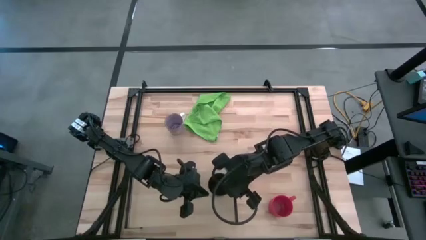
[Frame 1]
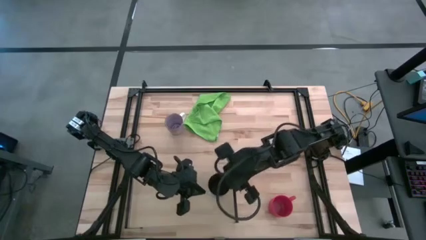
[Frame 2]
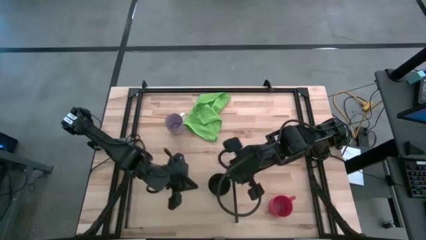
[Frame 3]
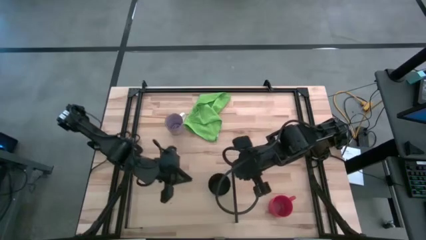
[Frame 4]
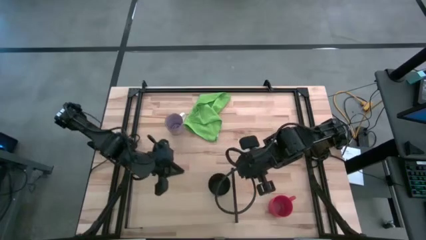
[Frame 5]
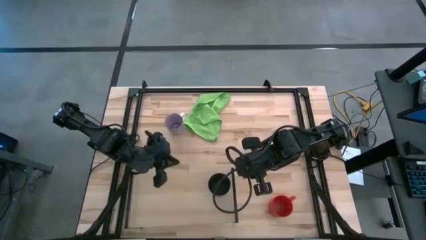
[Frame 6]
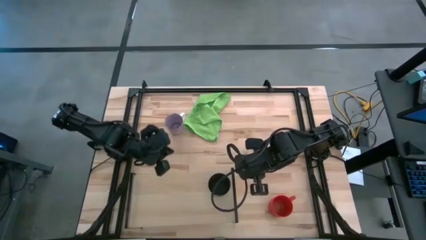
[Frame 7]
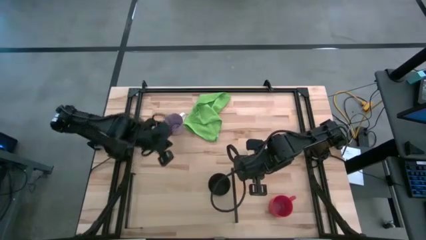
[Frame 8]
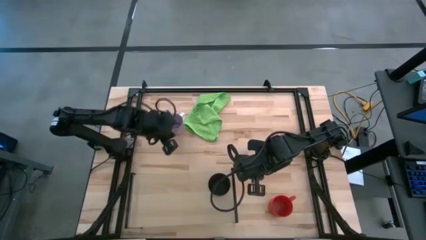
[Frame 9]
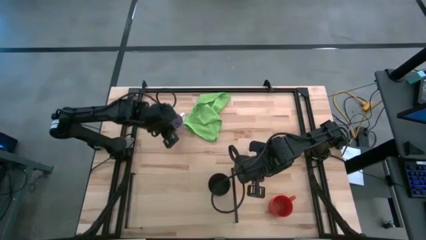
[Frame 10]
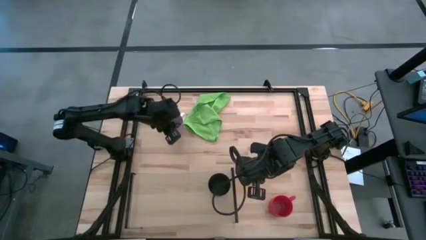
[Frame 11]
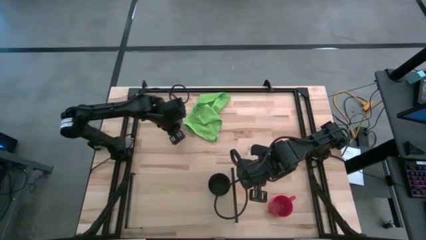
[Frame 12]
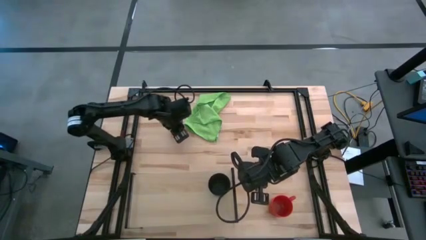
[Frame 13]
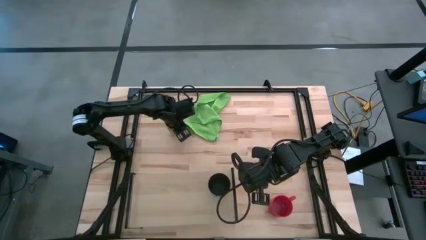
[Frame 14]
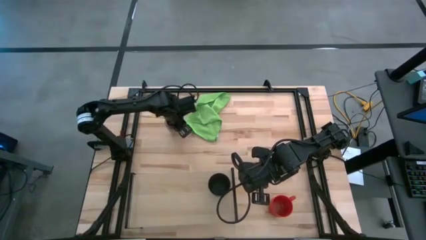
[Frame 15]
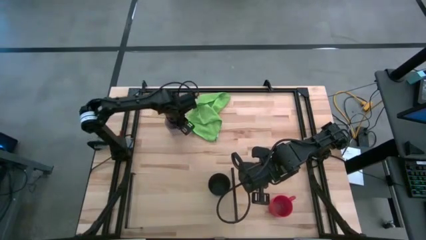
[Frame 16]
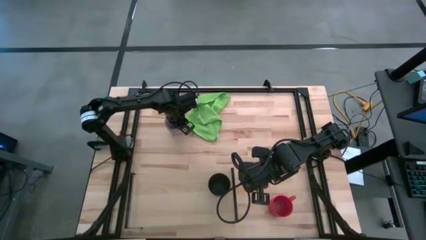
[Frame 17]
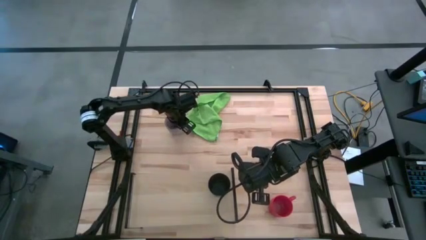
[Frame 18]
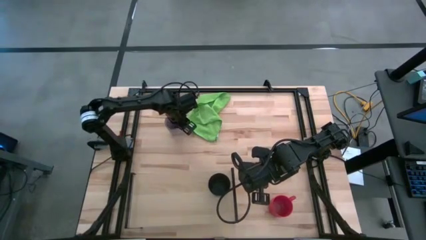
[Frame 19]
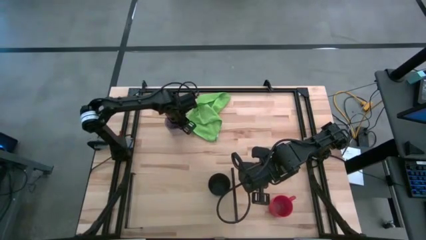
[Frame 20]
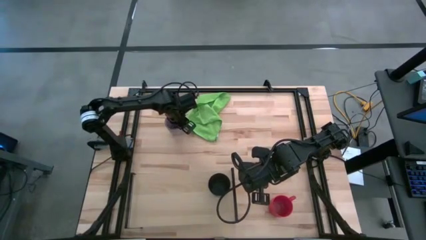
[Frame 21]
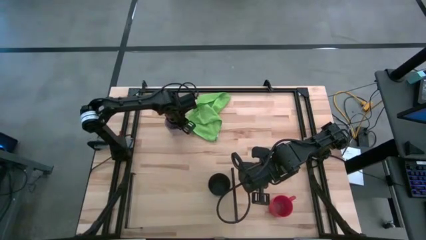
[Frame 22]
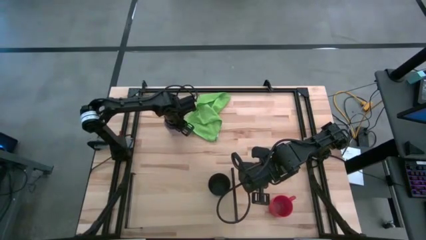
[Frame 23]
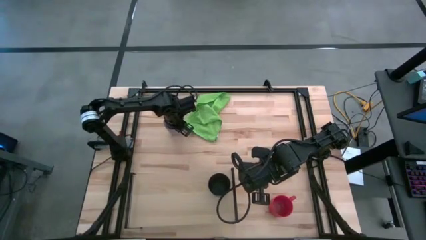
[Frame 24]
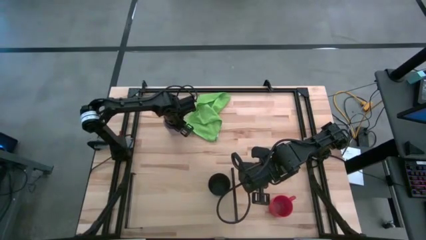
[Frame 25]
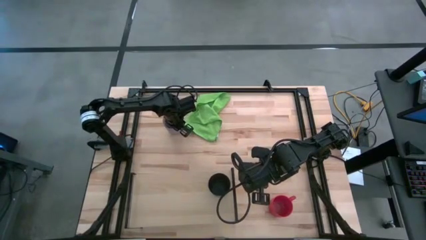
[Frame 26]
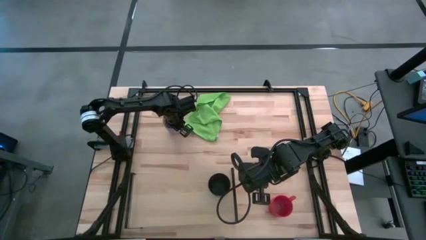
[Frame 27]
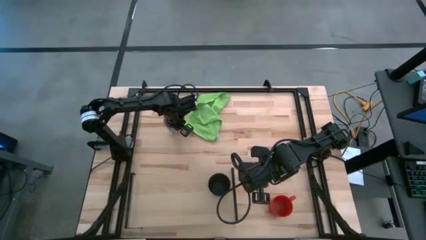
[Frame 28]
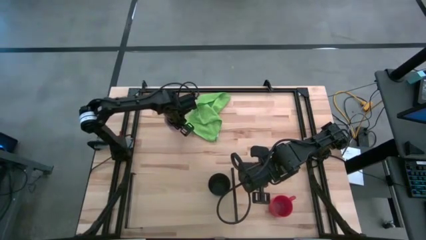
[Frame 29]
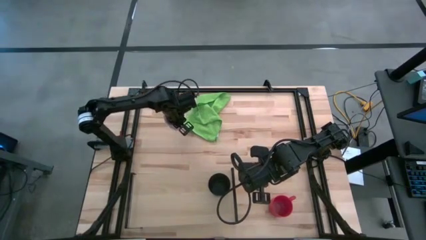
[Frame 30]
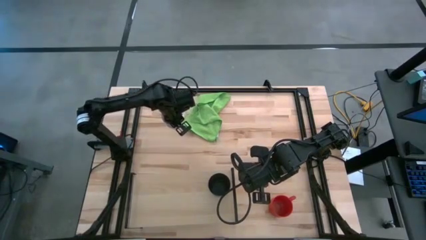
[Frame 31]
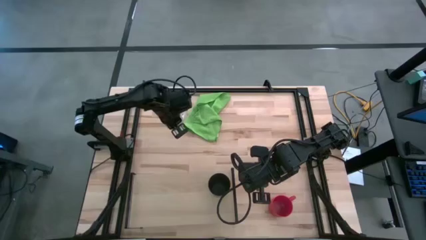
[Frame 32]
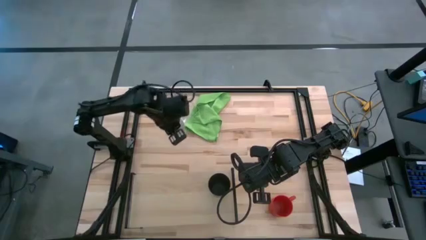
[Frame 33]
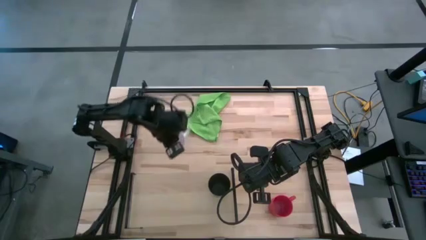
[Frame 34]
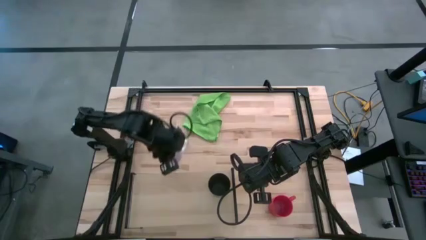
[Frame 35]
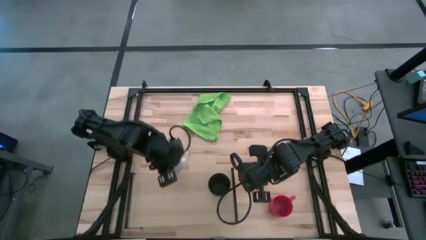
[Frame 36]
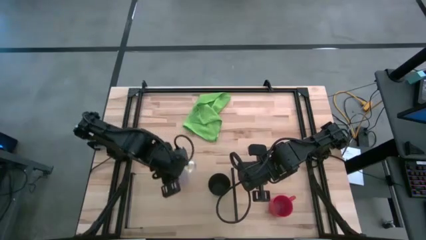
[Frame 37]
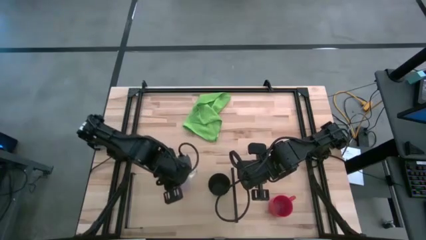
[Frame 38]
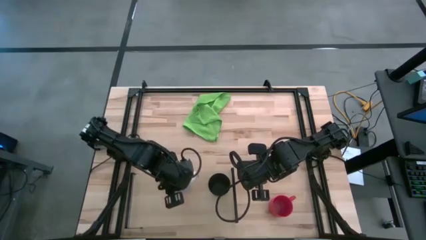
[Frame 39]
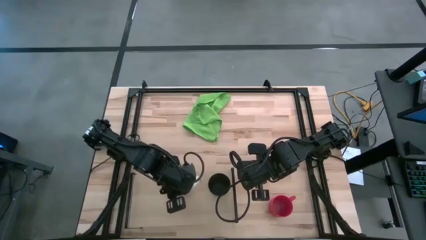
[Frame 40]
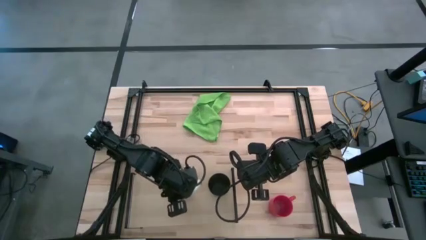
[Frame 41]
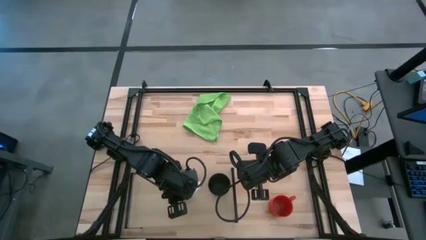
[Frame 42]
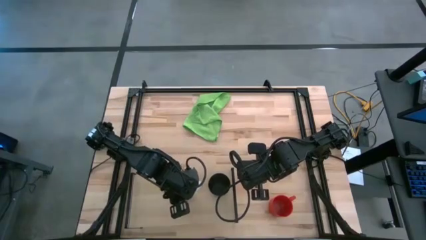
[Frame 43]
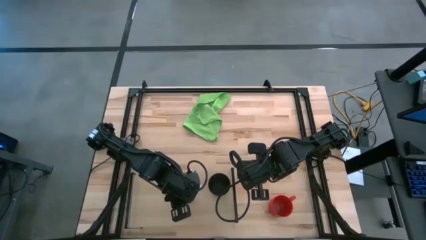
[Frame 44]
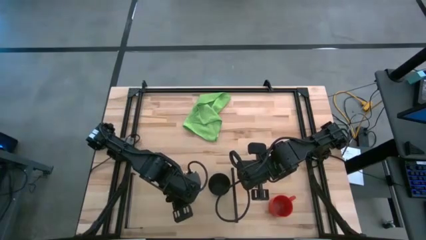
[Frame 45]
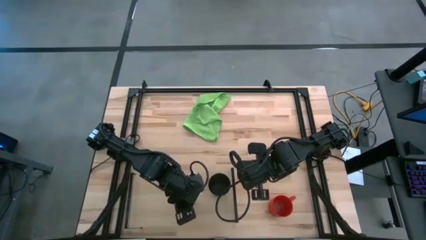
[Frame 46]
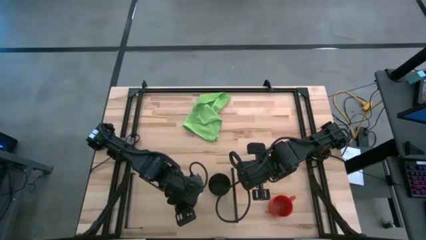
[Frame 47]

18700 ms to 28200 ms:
Task: Stack small to large cups/mugs on shelf
Put the purple mug on the shelf

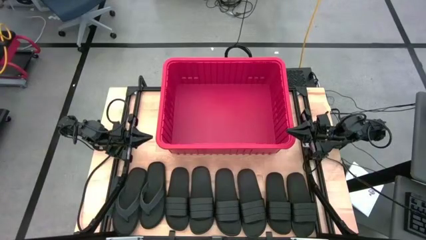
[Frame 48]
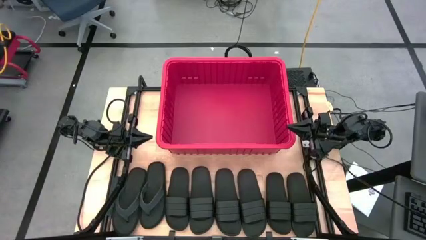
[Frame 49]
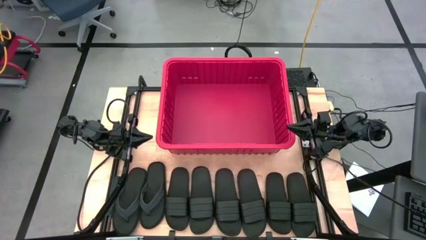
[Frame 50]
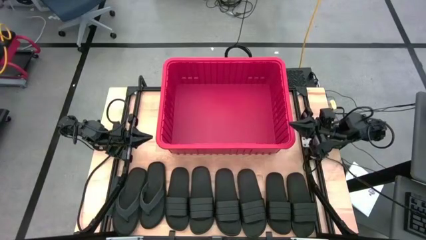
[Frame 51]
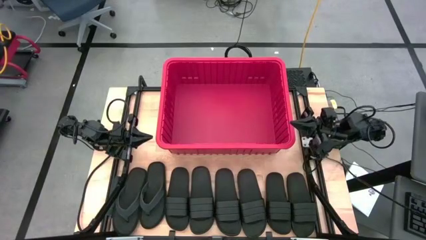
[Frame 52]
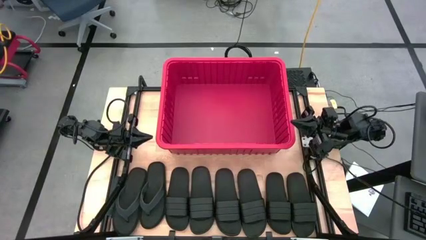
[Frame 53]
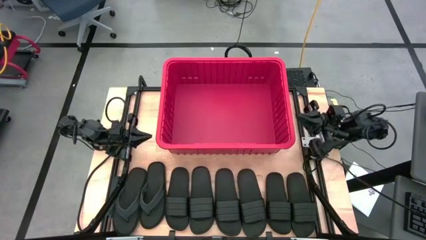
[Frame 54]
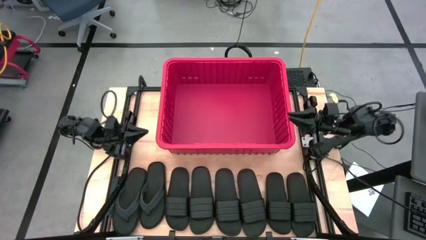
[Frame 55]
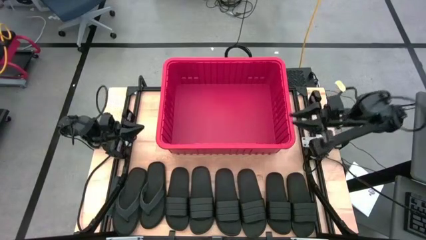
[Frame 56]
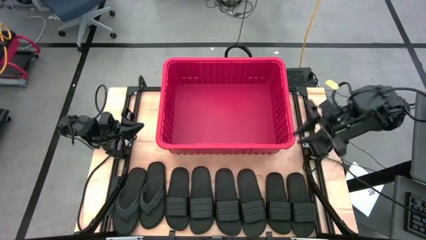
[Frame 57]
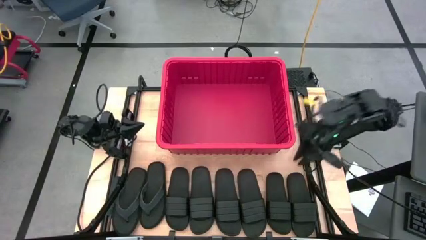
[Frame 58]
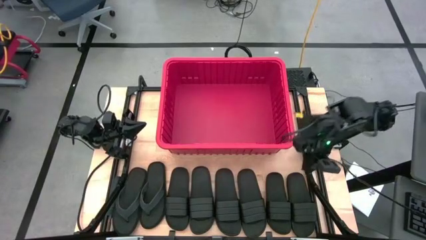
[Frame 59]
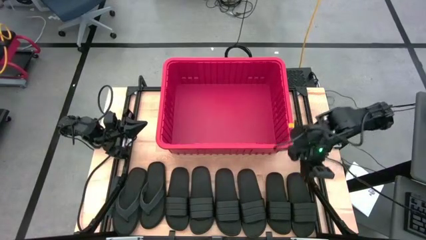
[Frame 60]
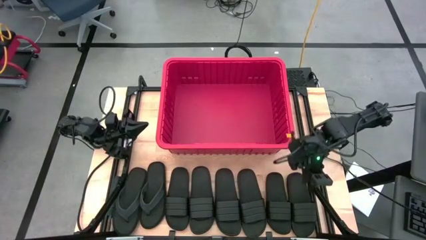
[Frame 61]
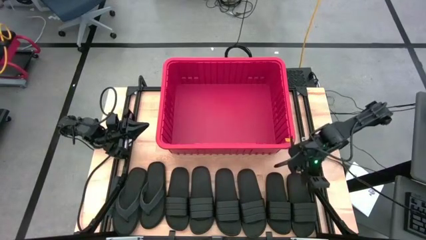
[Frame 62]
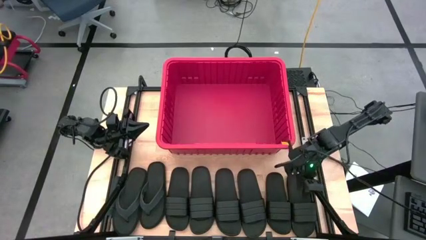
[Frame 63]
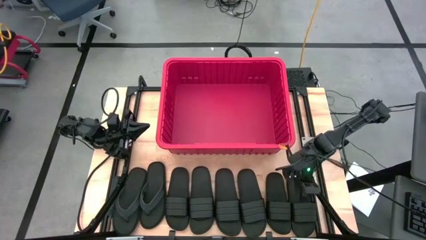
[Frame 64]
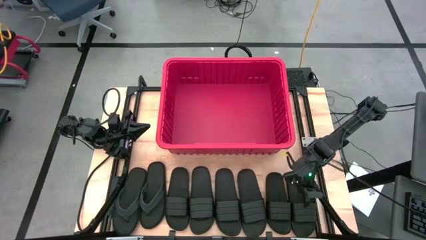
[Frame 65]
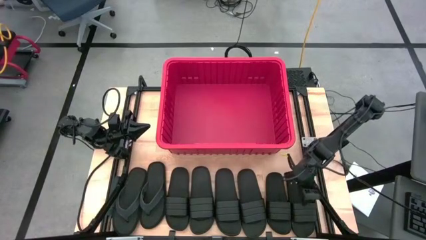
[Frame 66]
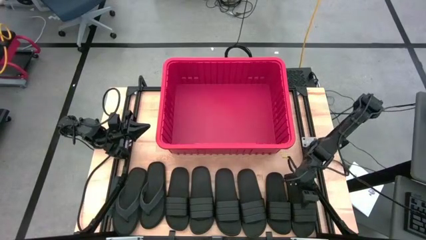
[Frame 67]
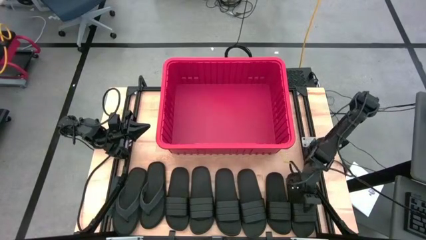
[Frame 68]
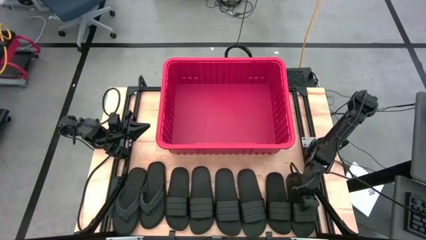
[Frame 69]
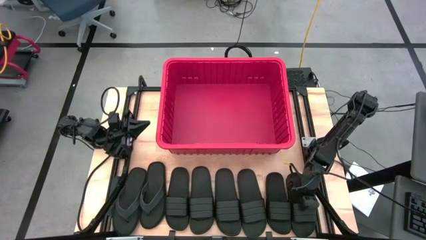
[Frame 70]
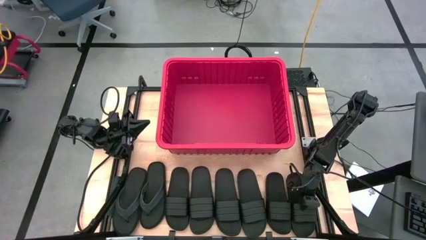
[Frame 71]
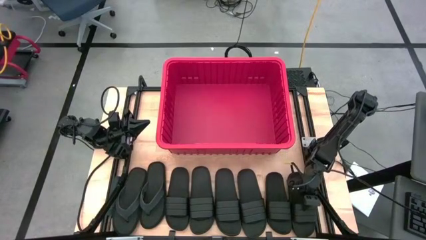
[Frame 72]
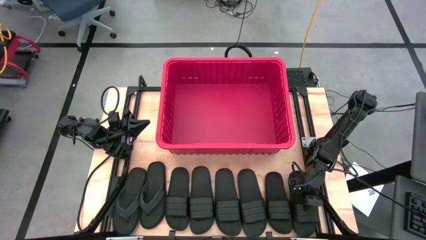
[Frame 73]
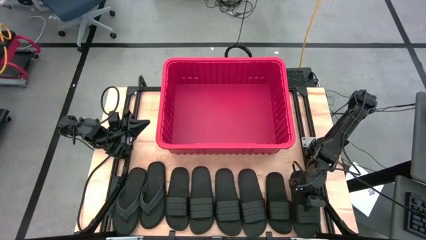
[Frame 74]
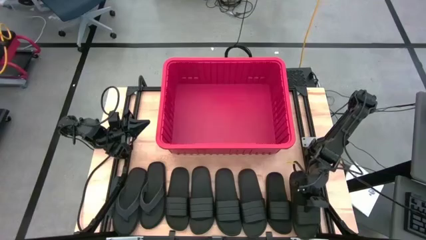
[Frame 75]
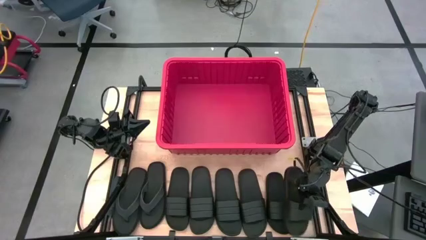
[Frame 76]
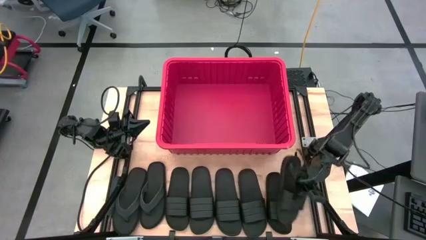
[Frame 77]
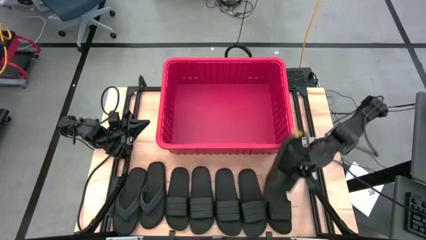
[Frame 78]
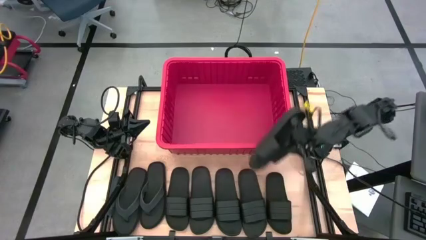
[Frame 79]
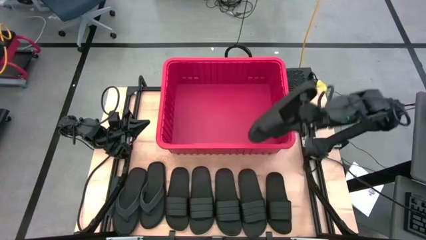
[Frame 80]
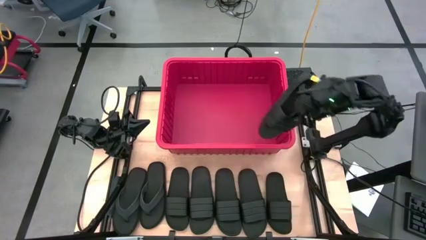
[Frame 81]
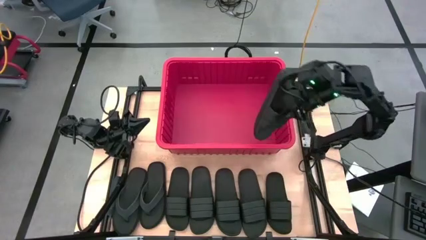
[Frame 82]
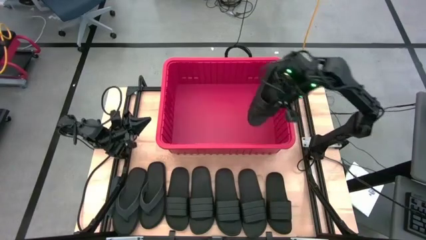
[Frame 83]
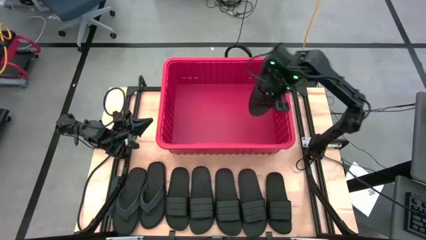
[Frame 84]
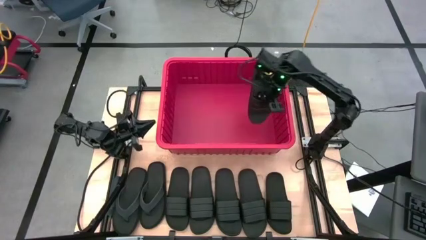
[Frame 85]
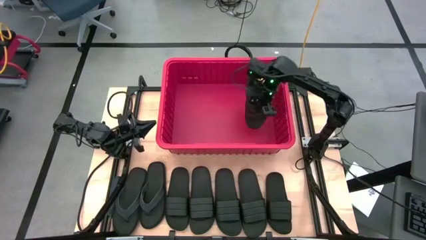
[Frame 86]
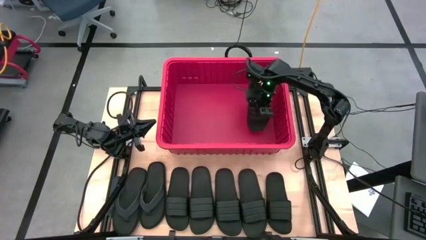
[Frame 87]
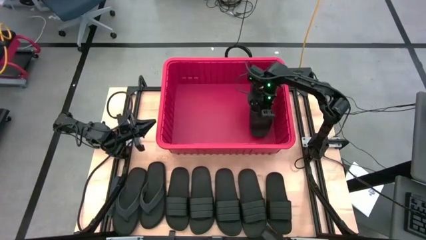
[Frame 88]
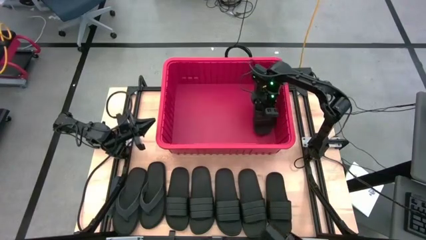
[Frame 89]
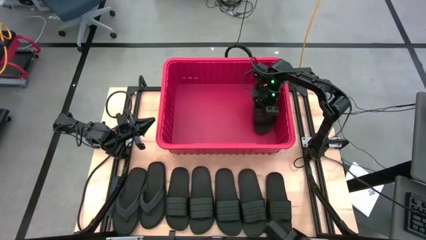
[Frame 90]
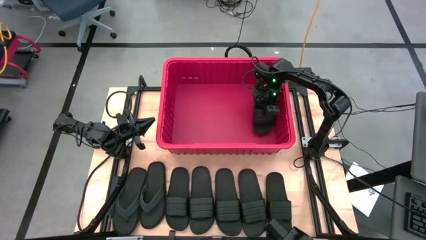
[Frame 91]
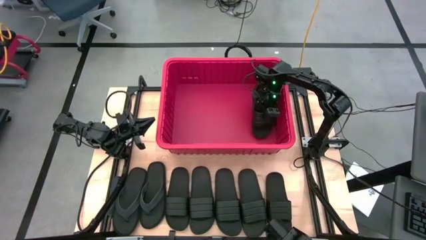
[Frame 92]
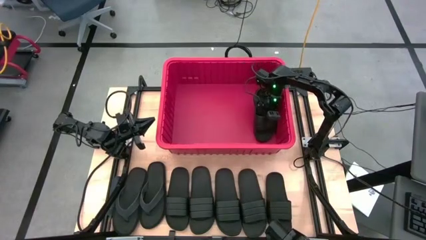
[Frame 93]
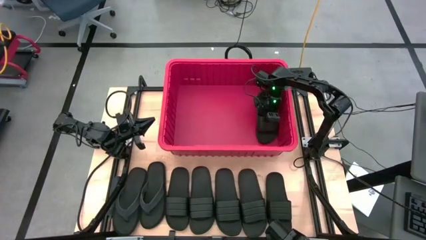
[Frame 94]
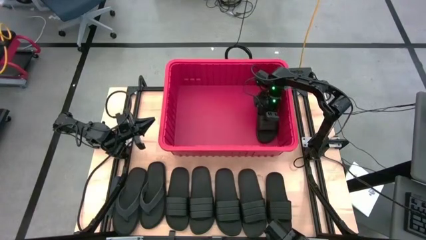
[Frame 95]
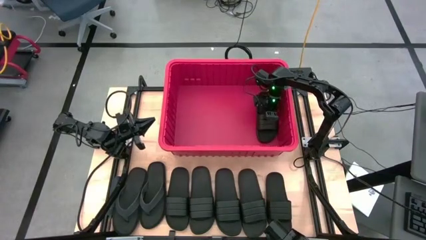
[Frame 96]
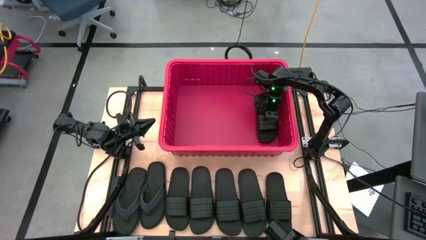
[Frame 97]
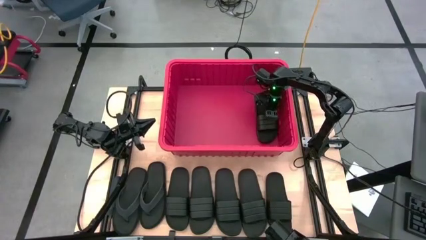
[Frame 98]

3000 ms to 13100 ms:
Task: Pick and place slides into bin
Put the black slide into the red container
